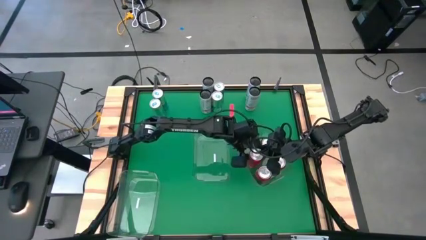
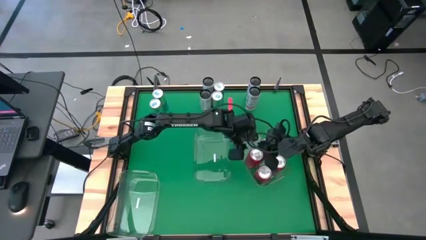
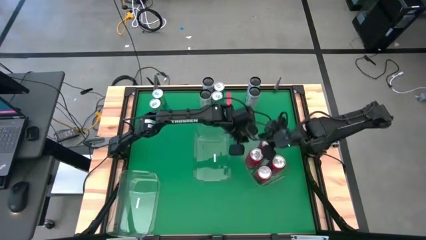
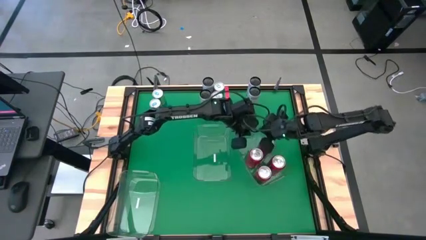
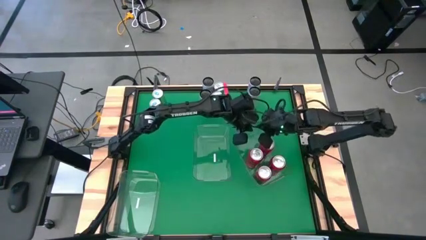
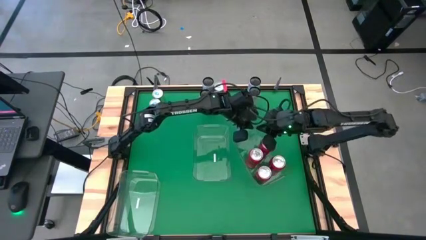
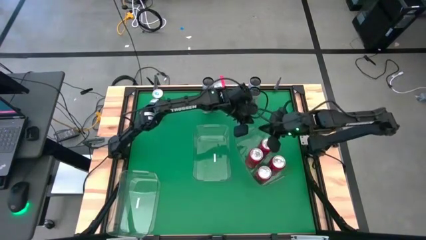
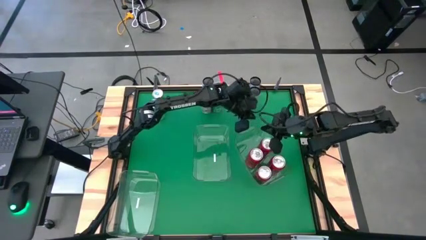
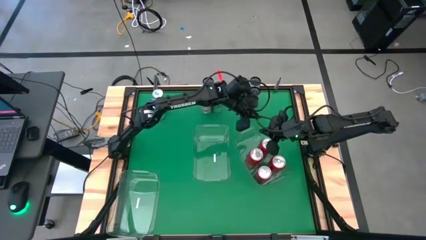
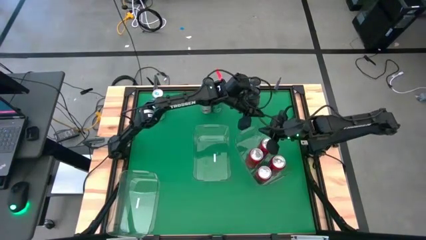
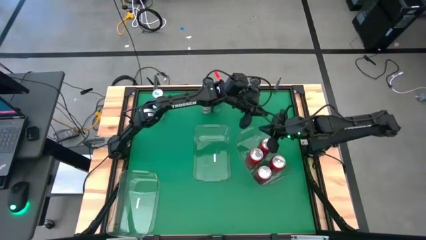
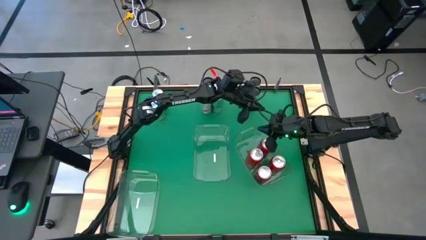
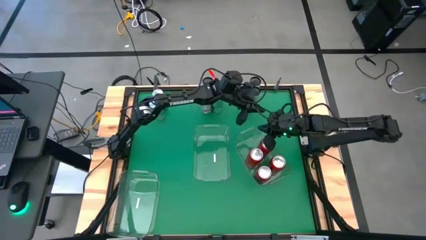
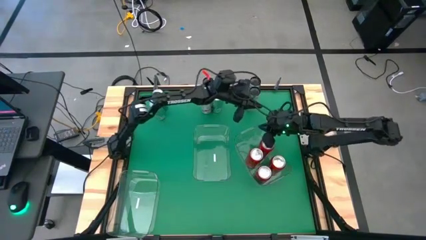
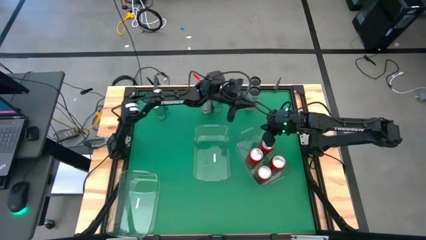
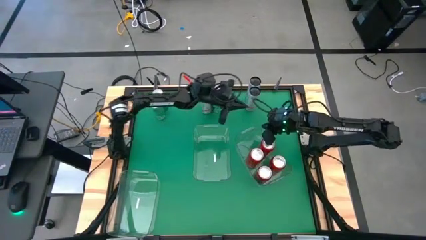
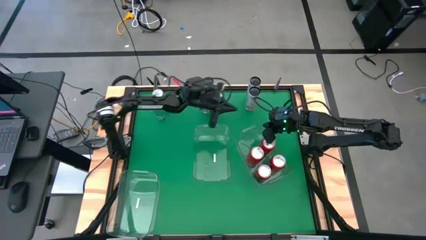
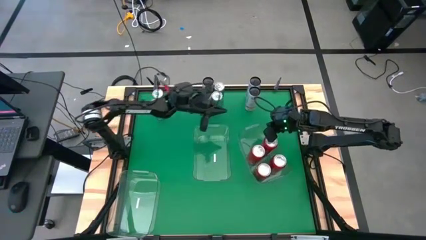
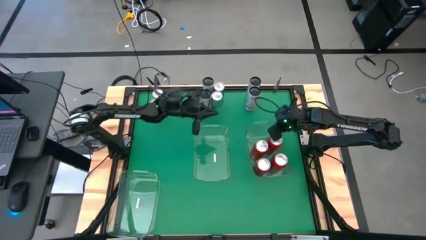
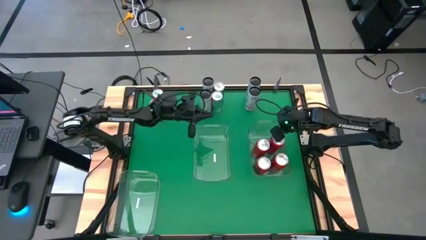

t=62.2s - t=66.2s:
Task: Sort soda cans
Adjust the top right transparent bin

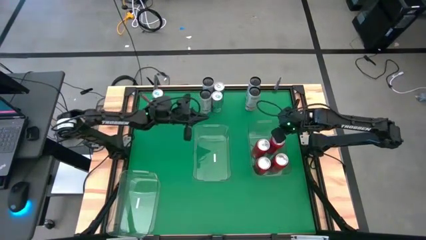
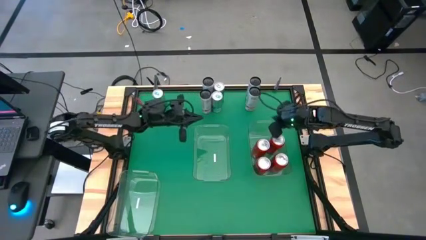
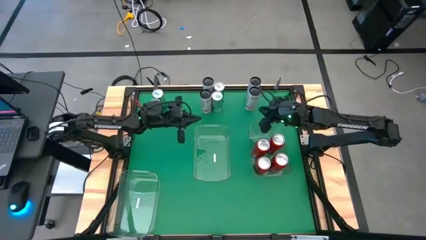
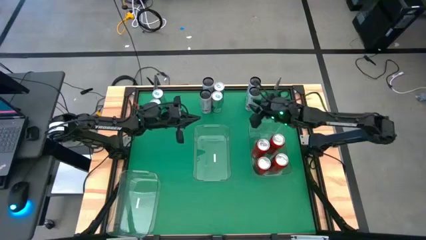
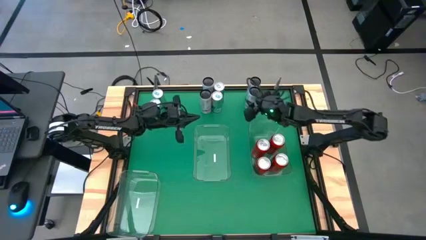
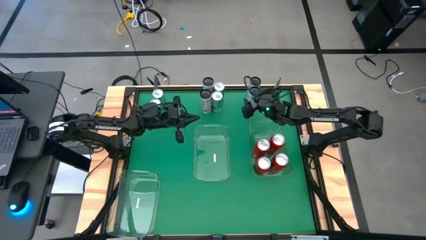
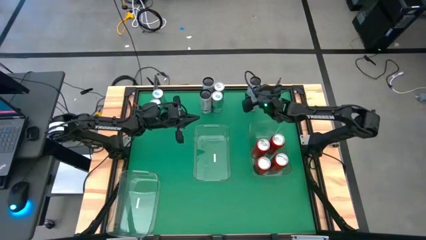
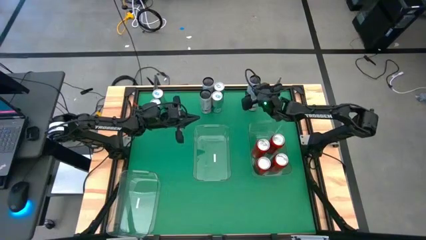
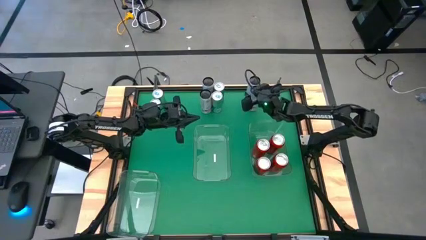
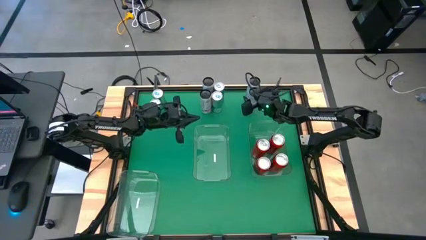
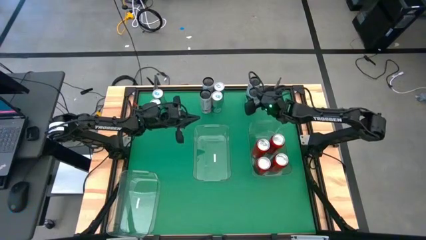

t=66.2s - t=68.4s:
Put the bottom right white-pink soda can into the top left transparent bin

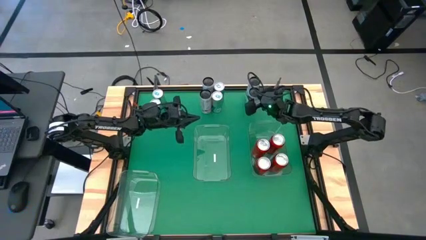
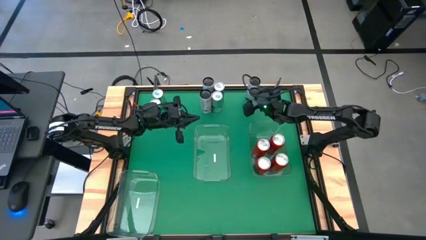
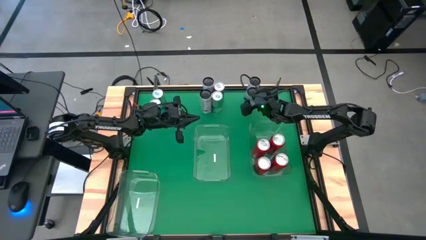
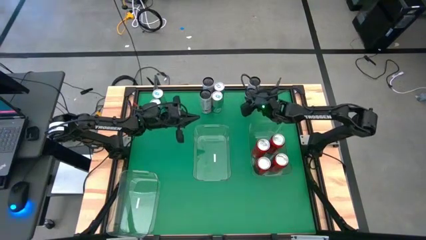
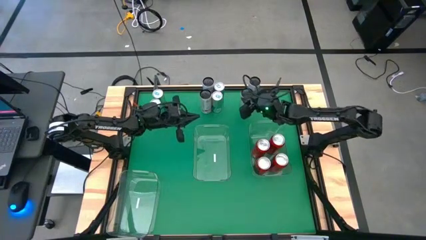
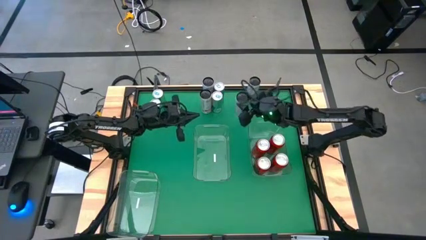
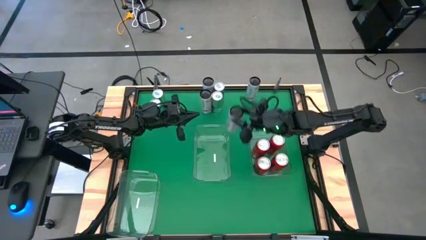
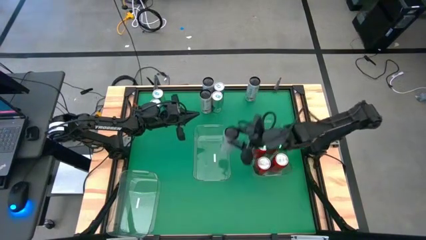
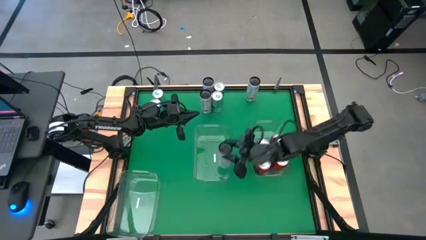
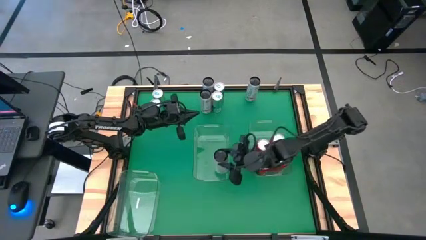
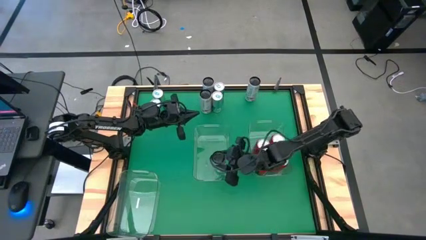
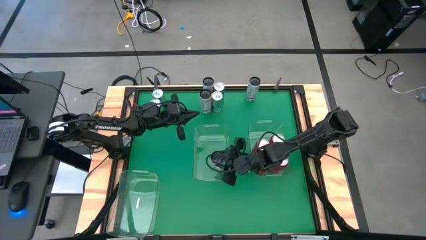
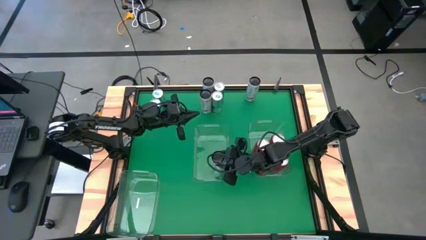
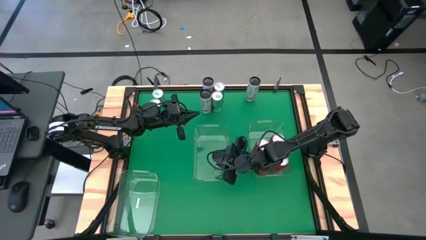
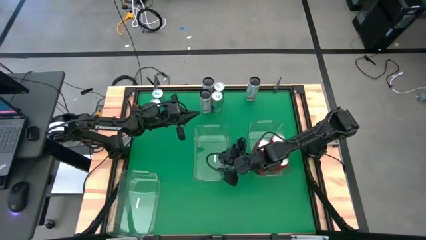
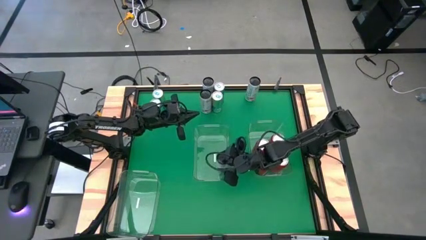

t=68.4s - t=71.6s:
Put the bottom right white-pink soda can into the top left transparent bin

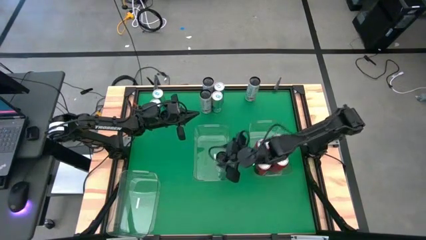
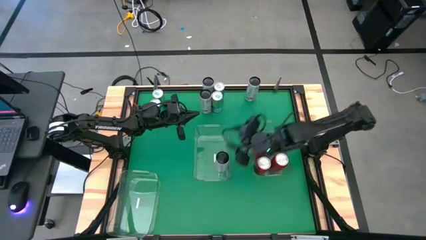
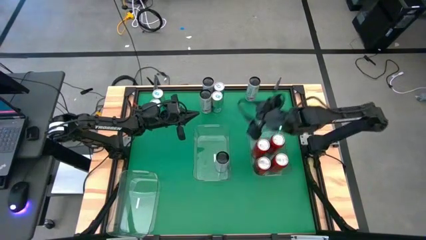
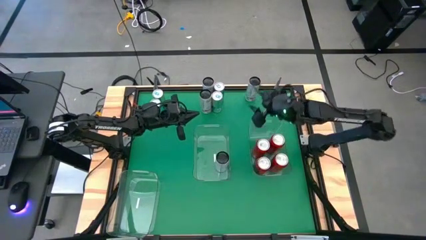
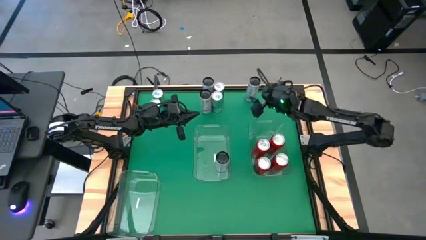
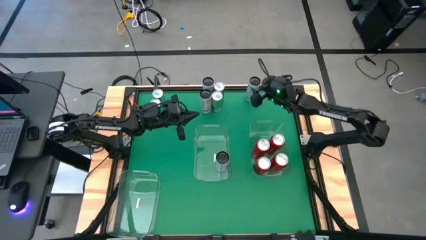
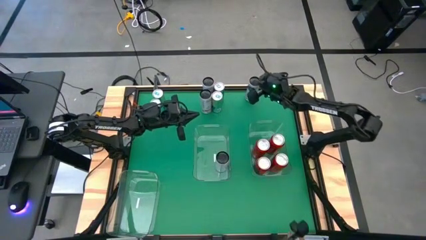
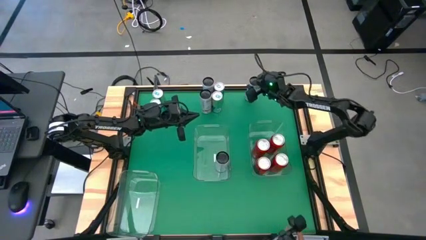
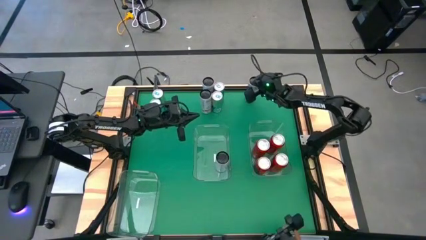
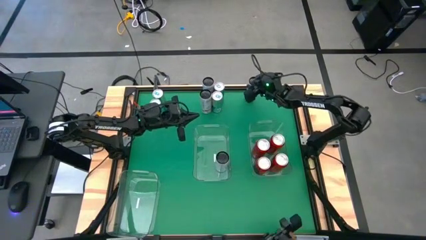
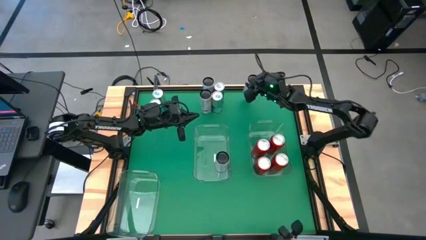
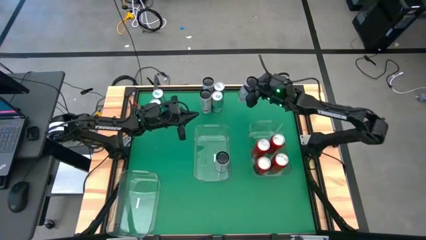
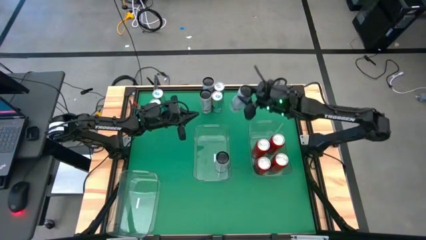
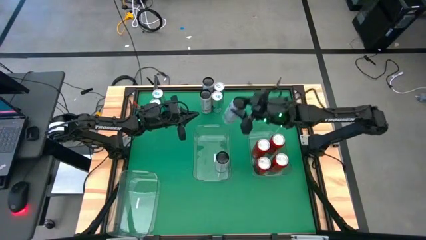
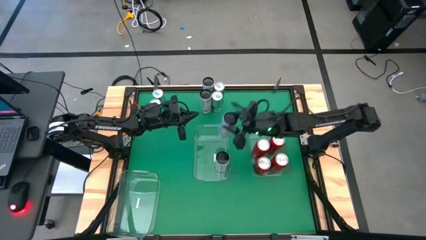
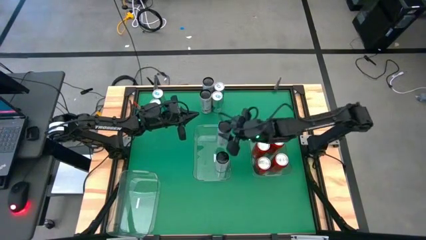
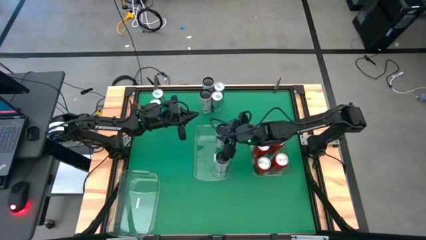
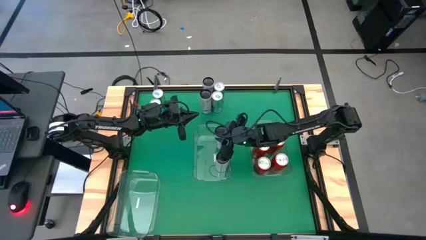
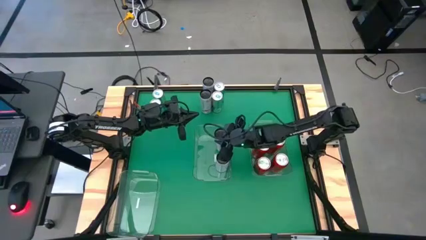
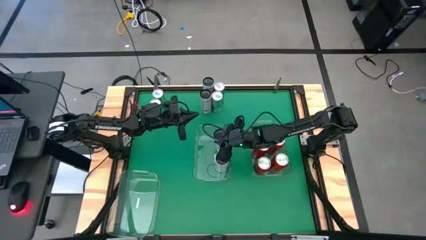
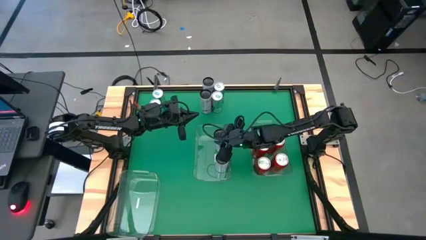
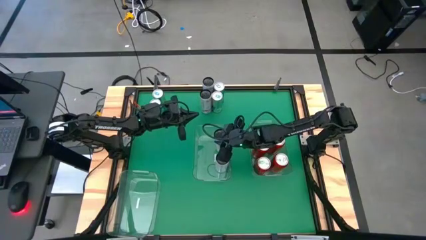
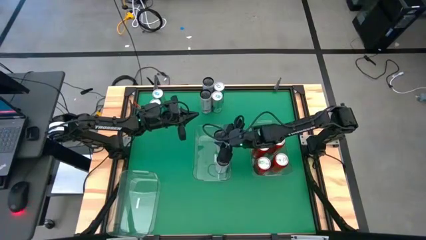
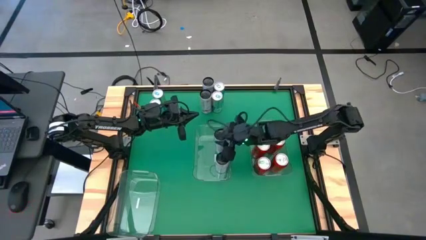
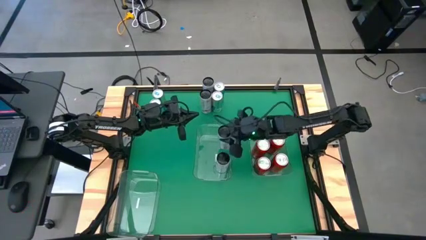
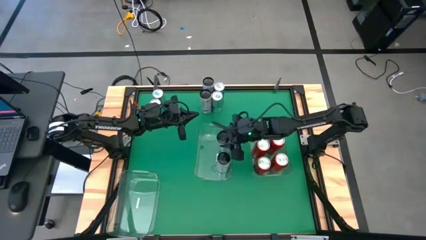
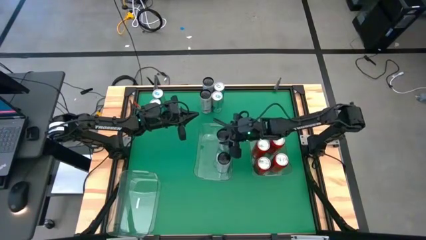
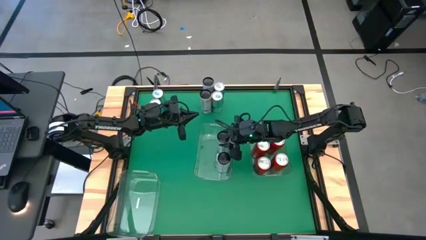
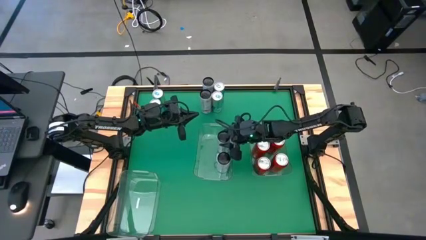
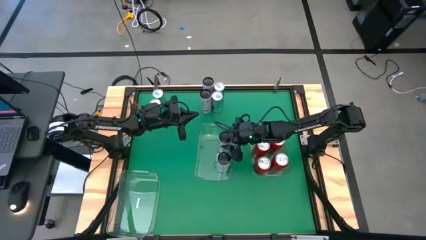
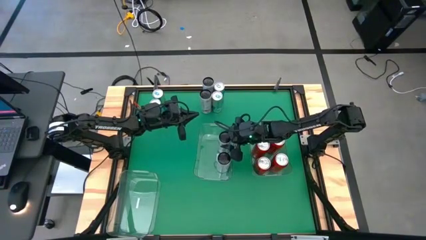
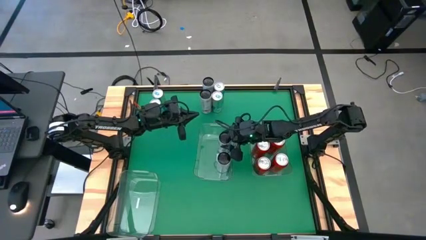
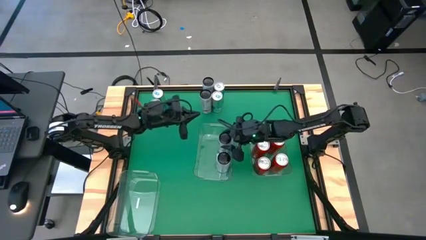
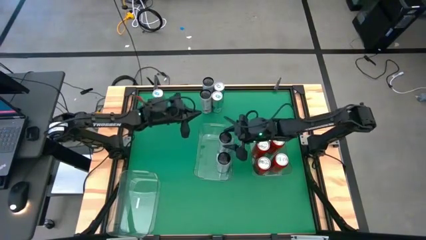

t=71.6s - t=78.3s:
Put the top right white-pink soda can into the top left transparent bin
